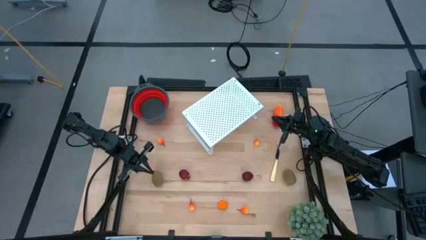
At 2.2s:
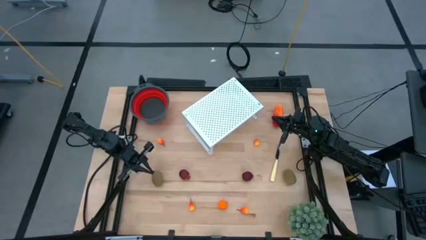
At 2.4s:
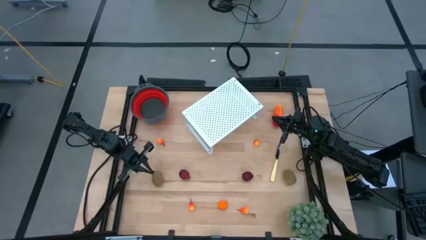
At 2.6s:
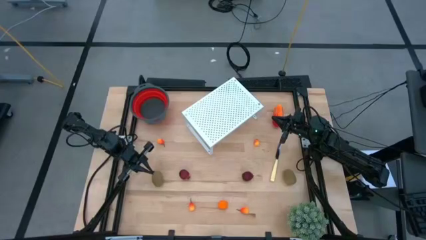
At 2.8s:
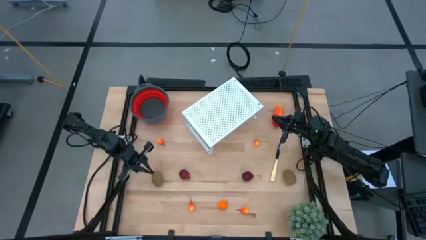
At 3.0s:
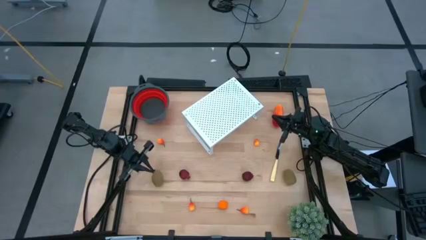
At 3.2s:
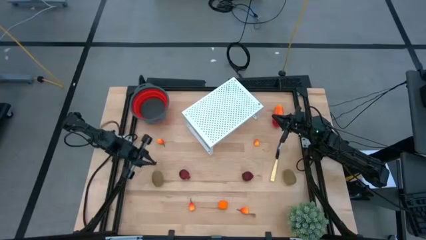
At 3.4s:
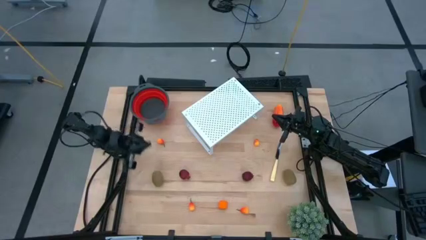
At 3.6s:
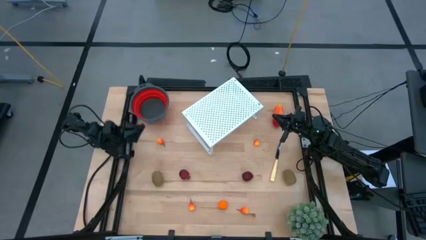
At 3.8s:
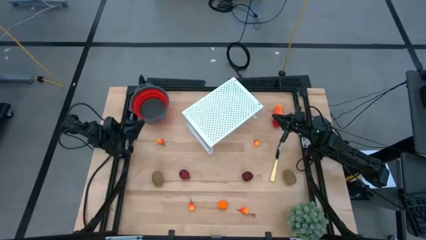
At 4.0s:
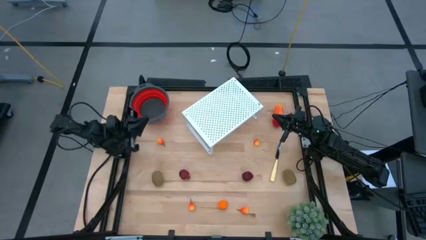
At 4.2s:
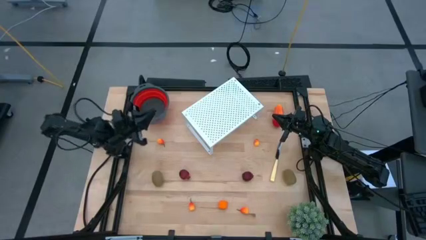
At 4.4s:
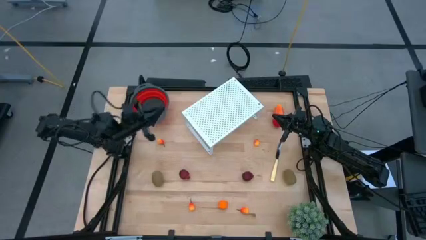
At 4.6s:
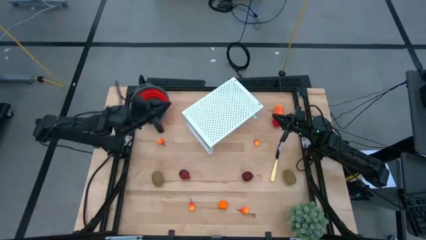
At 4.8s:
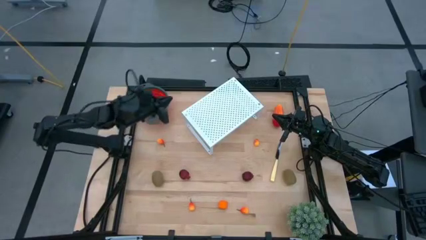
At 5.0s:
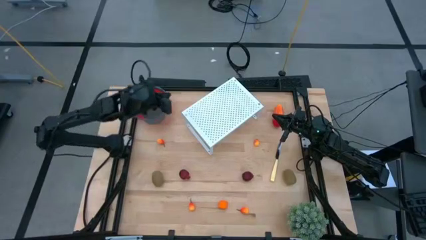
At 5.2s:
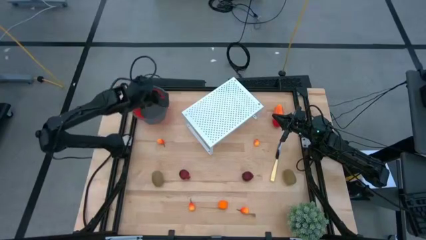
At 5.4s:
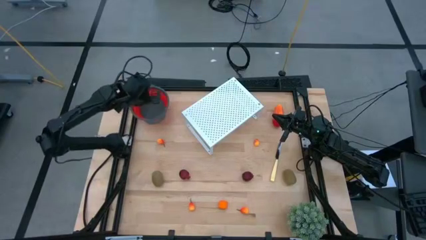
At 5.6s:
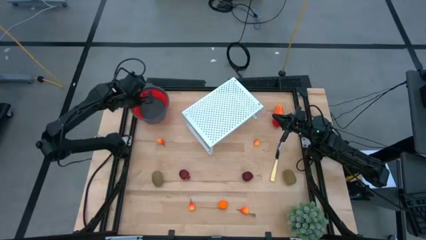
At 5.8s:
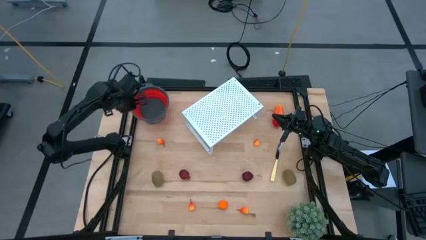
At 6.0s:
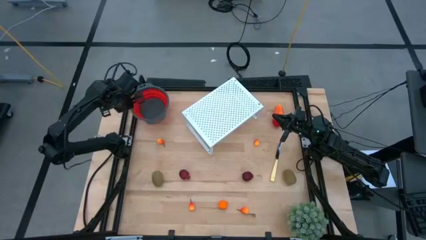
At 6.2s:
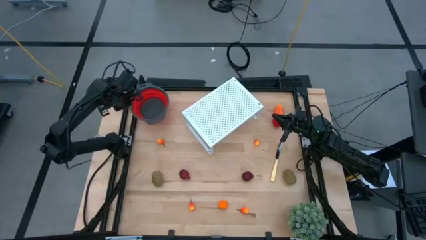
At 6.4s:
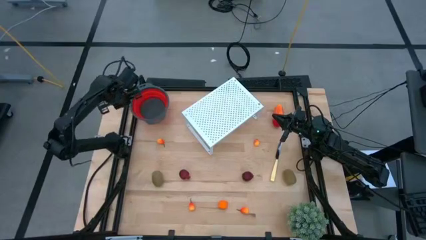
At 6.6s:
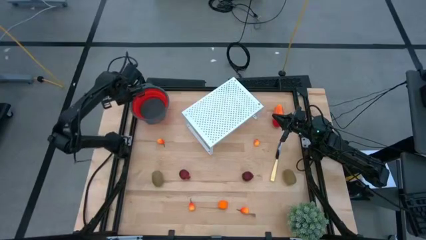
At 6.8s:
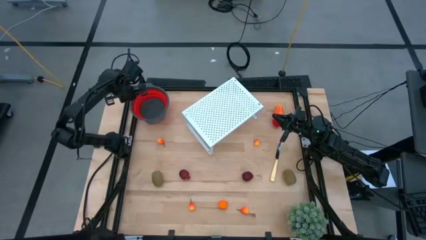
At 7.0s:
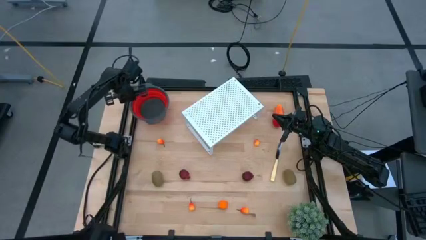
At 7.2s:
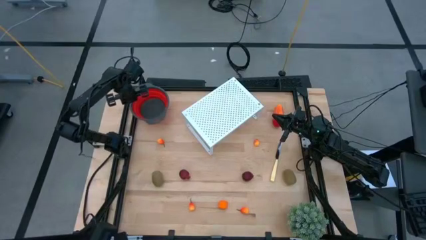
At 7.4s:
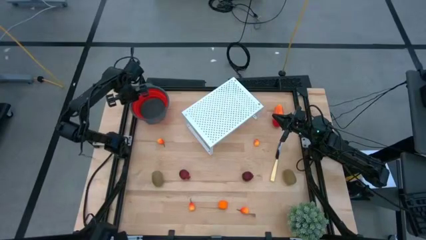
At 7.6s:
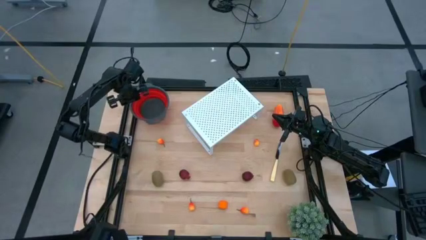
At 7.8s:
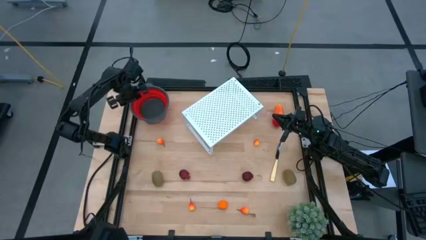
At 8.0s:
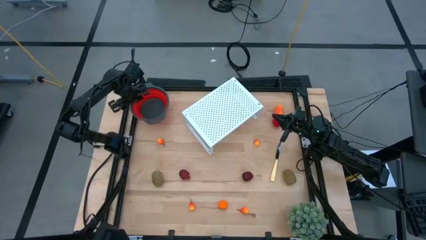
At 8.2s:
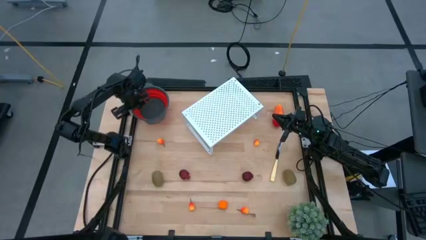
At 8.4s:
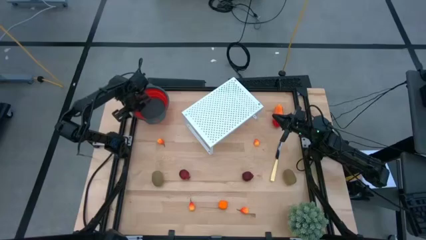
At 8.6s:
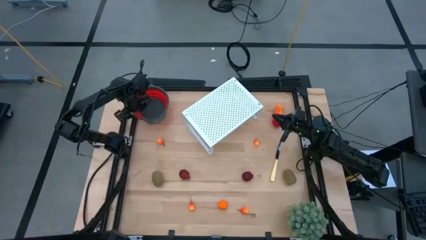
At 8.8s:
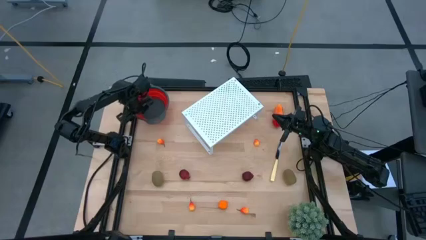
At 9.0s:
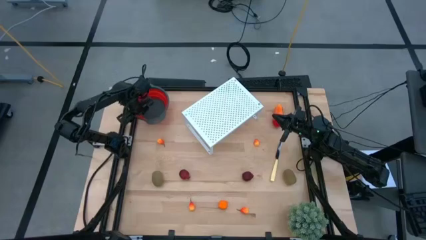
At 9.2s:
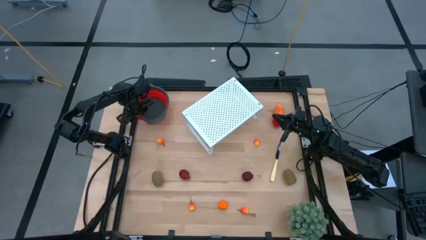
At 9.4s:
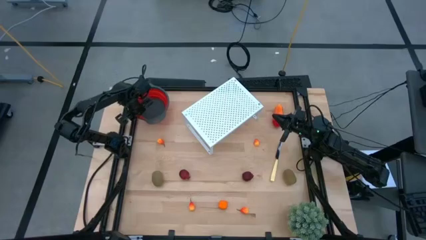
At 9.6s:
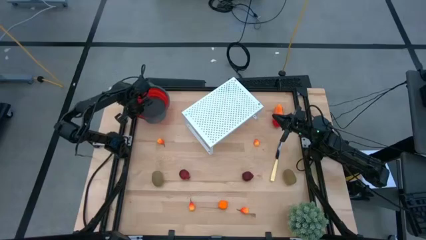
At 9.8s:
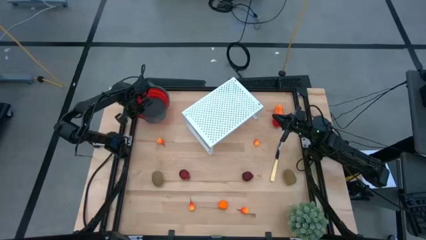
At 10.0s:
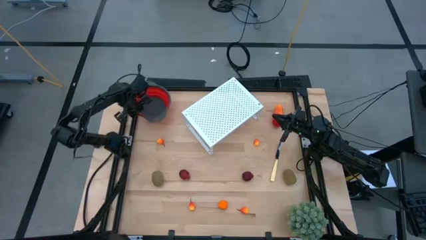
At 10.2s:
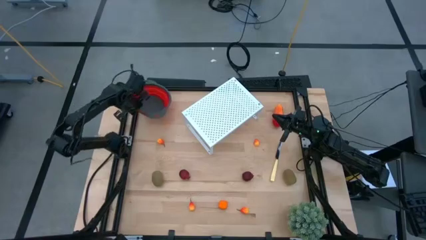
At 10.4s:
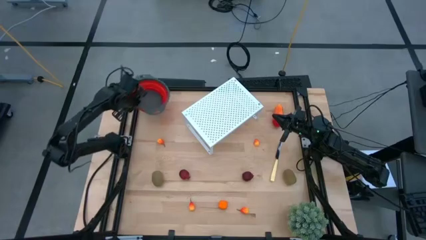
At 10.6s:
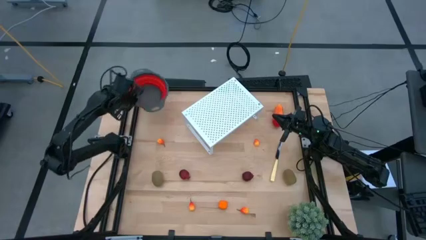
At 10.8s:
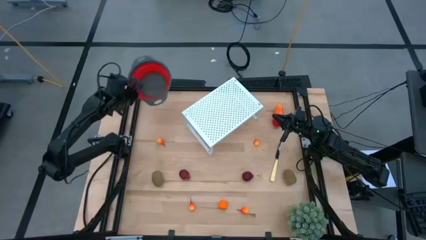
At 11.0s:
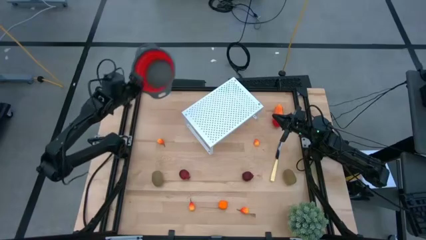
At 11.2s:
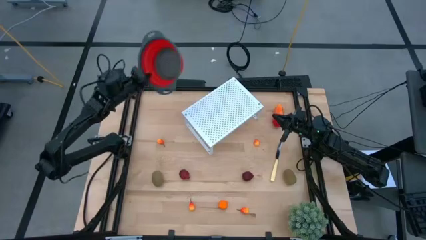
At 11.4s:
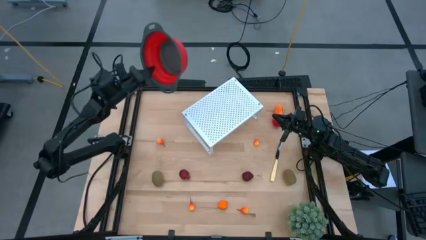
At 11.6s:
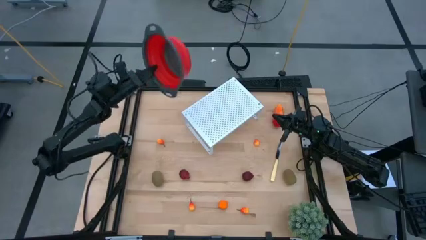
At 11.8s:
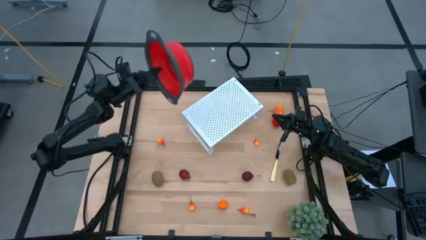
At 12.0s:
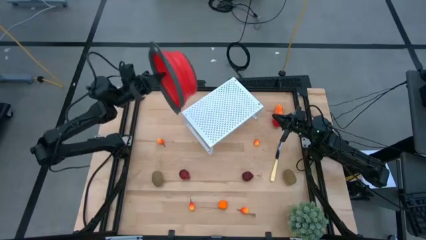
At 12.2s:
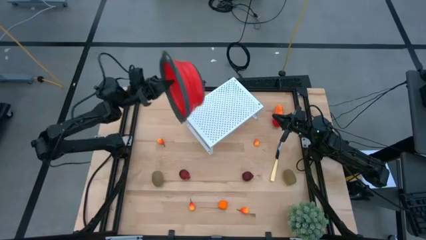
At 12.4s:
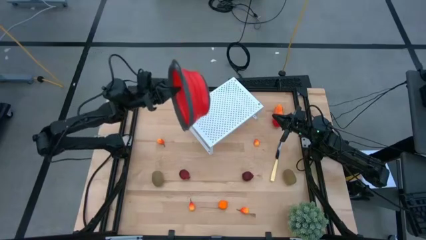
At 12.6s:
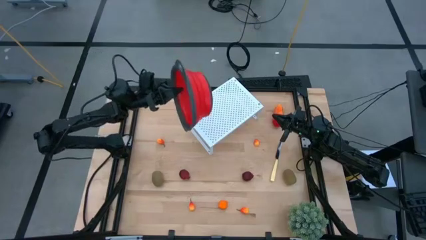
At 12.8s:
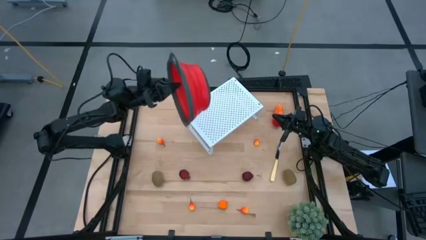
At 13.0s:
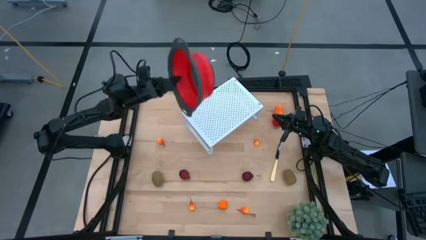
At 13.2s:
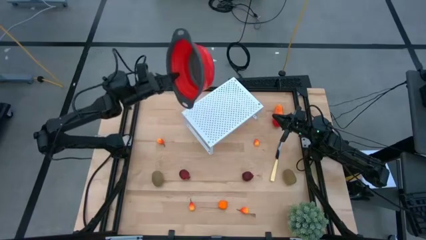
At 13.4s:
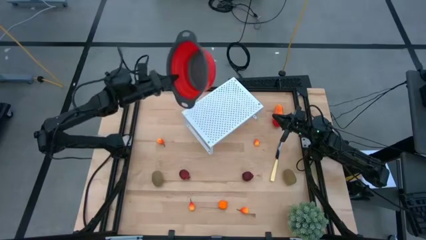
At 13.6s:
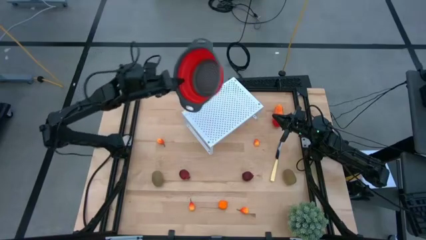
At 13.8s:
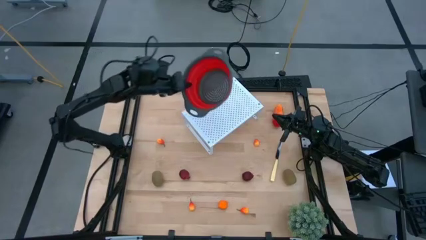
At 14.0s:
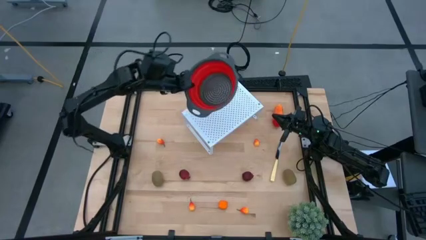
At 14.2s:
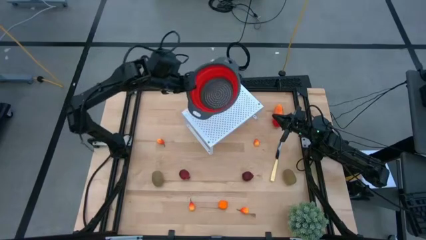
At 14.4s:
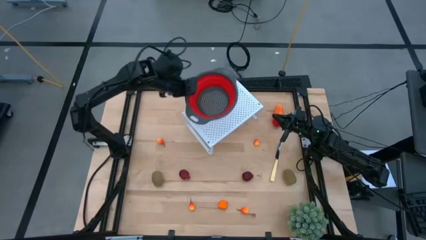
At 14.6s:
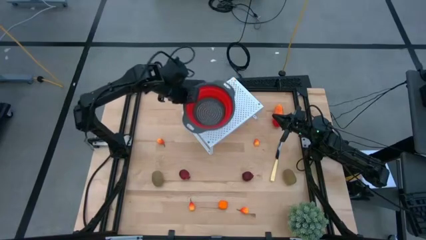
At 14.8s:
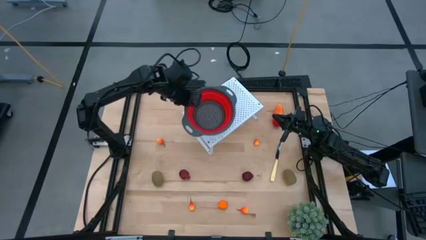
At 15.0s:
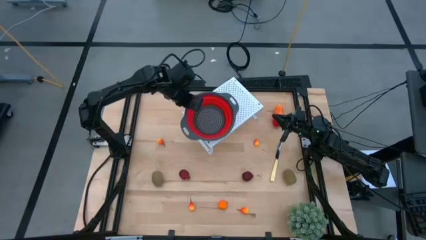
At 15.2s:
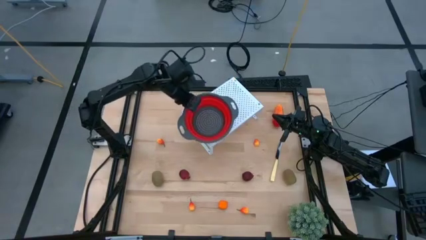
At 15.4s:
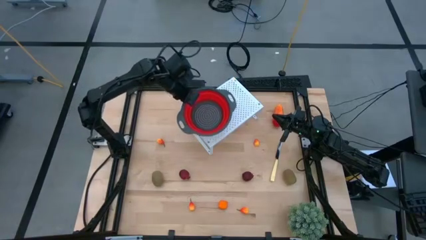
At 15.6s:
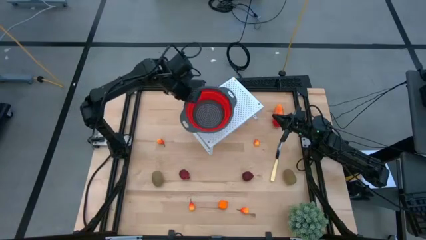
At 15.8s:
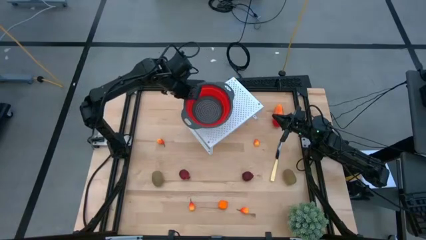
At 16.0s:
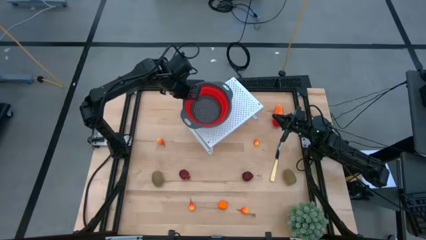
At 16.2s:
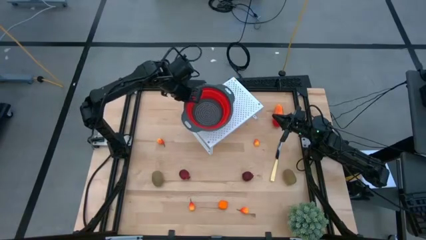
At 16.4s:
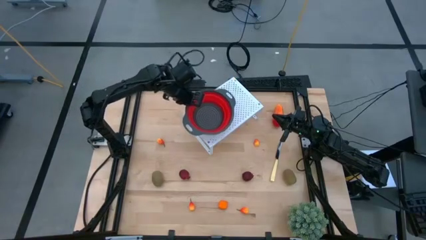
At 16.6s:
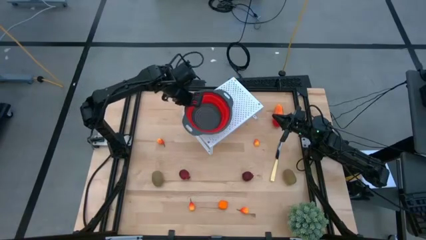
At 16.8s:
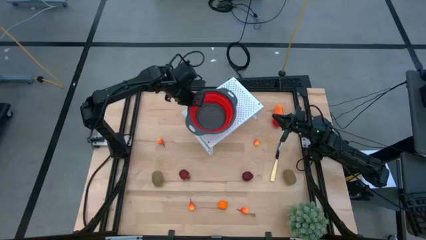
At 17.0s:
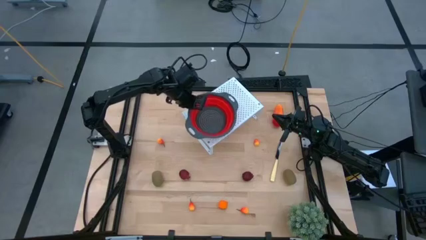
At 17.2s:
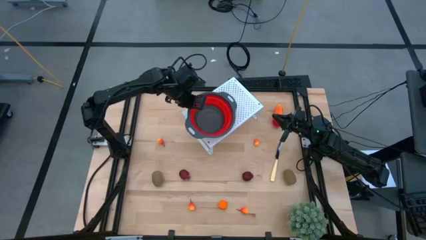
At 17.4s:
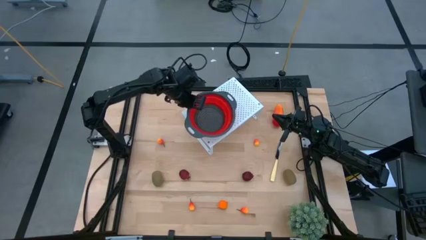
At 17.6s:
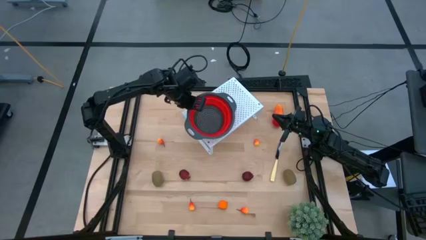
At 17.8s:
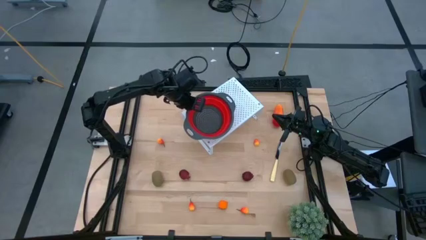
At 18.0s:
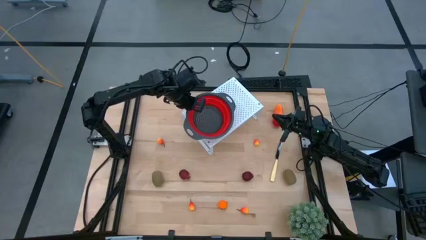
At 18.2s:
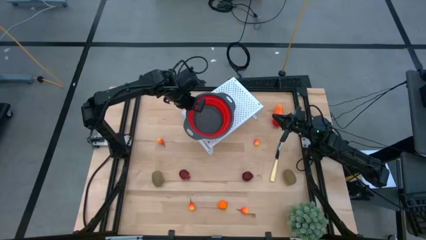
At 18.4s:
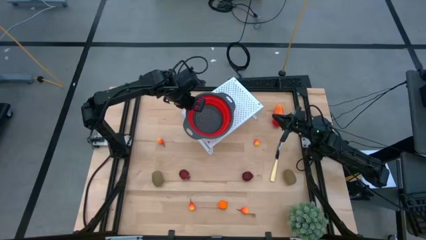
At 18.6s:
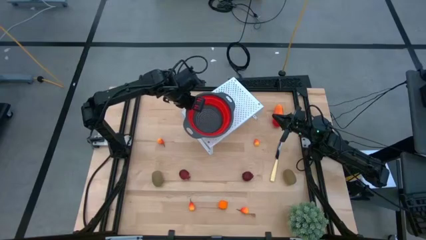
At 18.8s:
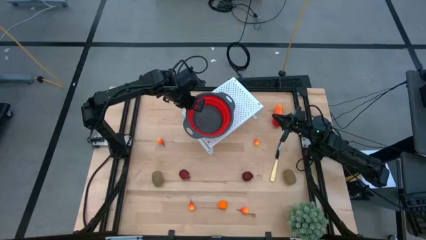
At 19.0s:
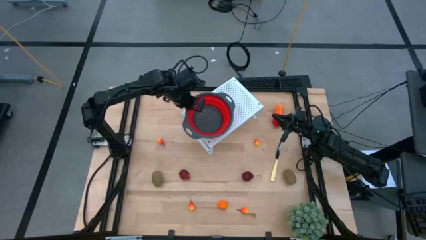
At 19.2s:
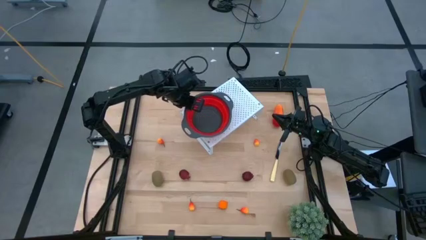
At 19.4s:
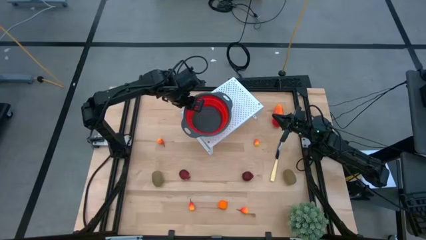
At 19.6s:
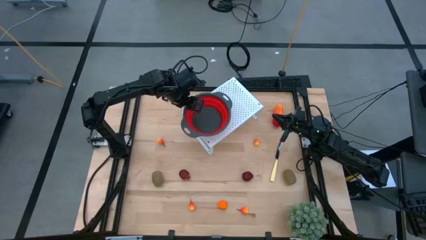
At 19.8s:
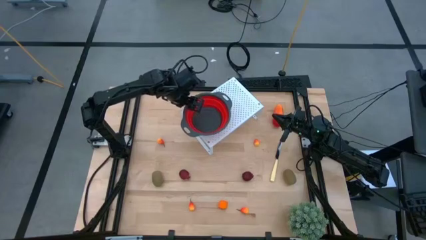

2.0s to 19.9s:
Task: Pick & Place Fruit
Put the red strainer bowl on the shelf
